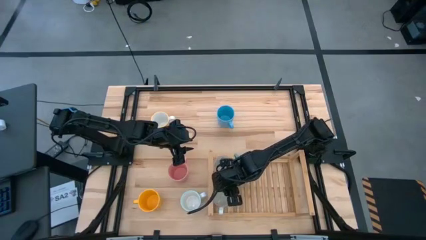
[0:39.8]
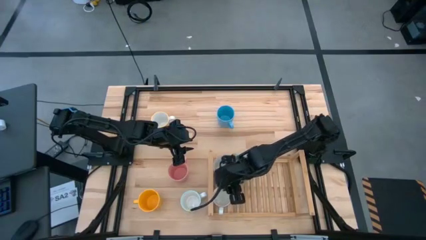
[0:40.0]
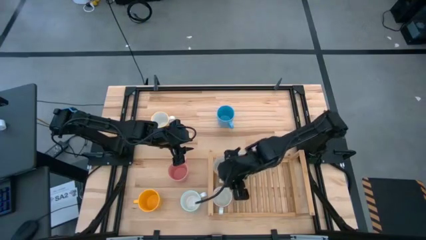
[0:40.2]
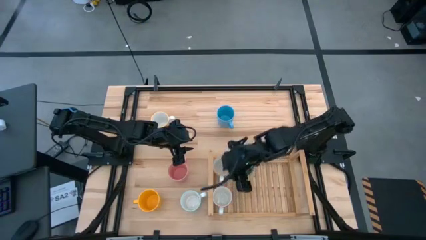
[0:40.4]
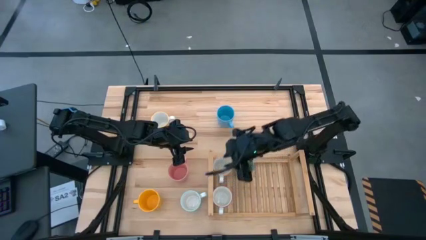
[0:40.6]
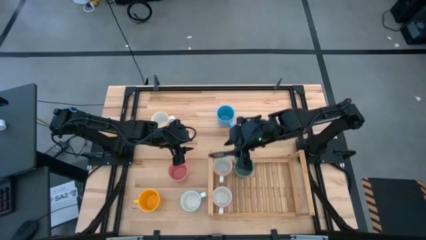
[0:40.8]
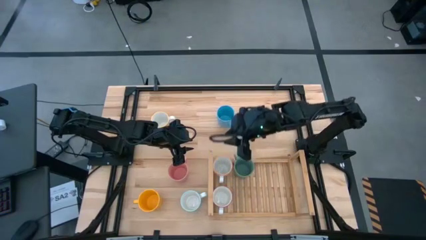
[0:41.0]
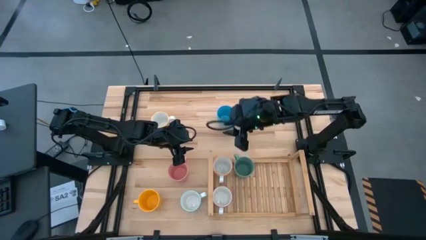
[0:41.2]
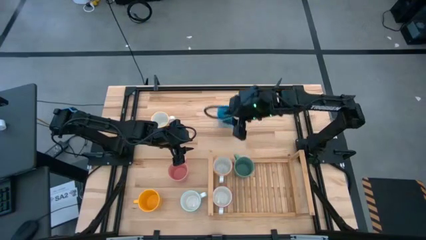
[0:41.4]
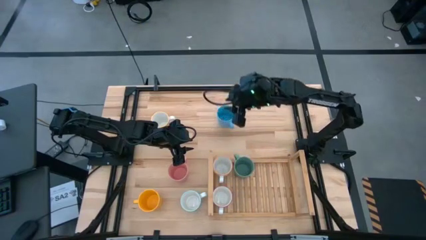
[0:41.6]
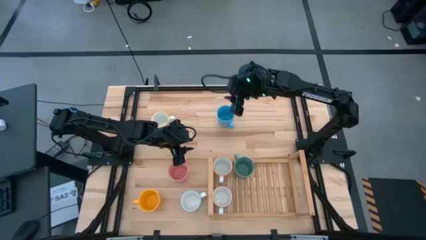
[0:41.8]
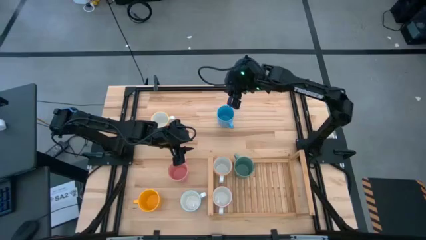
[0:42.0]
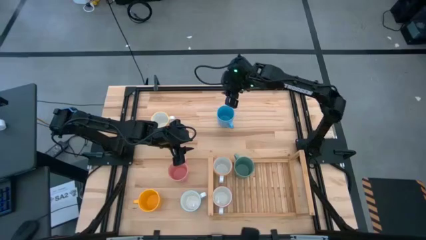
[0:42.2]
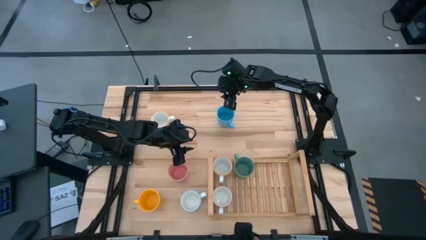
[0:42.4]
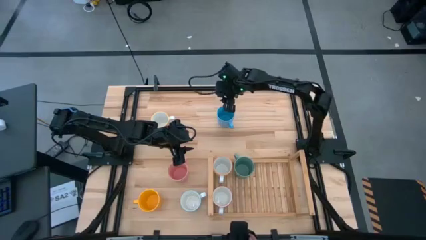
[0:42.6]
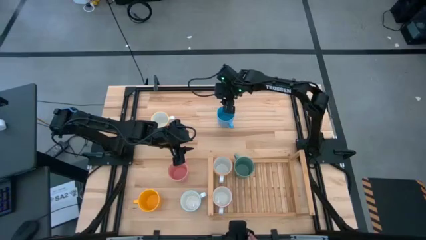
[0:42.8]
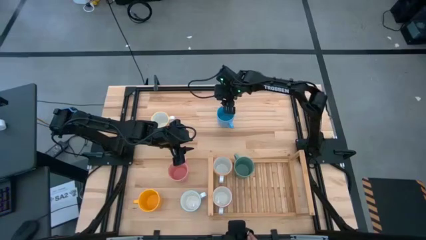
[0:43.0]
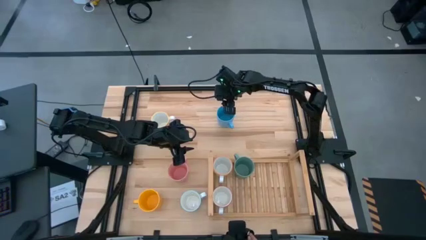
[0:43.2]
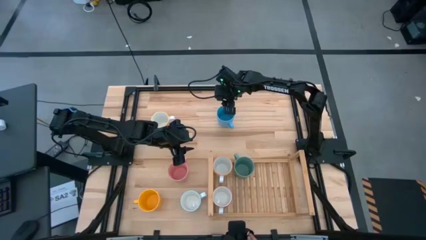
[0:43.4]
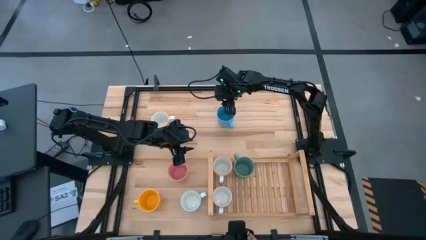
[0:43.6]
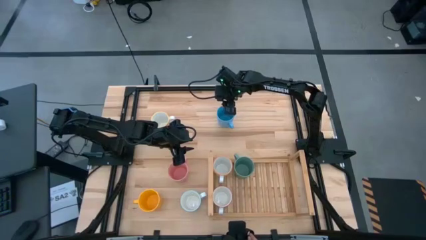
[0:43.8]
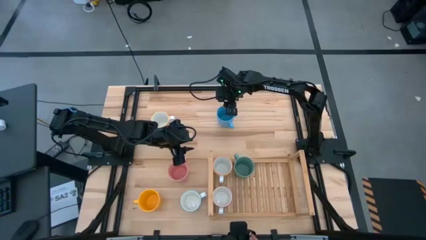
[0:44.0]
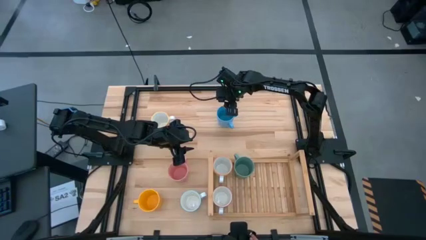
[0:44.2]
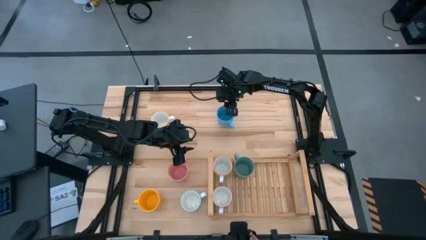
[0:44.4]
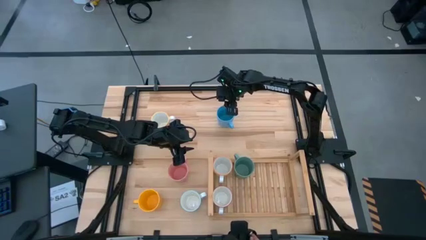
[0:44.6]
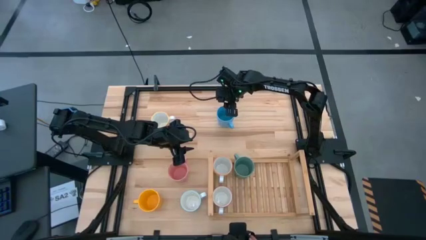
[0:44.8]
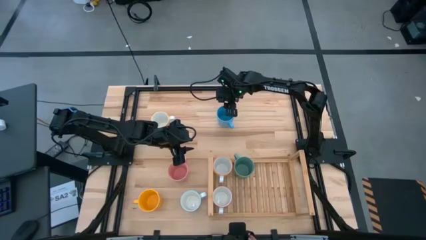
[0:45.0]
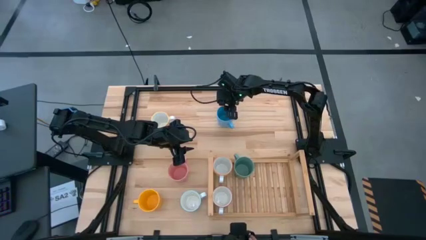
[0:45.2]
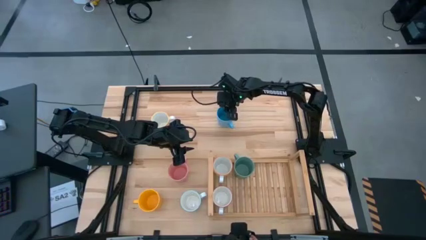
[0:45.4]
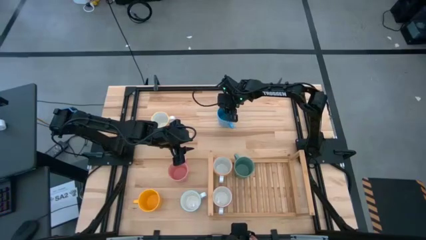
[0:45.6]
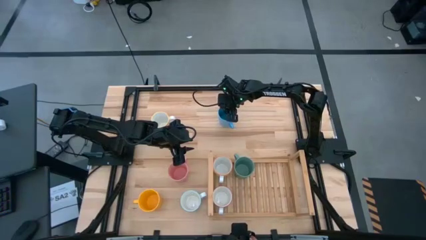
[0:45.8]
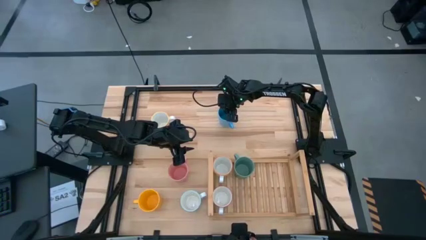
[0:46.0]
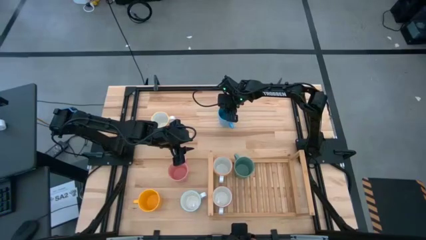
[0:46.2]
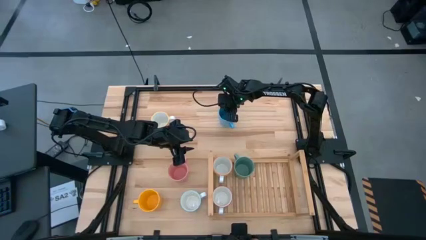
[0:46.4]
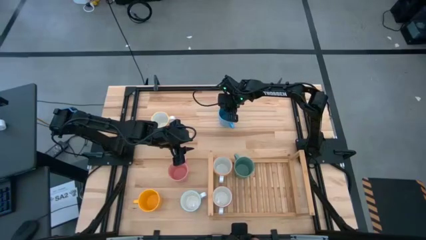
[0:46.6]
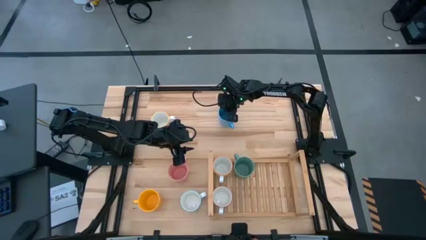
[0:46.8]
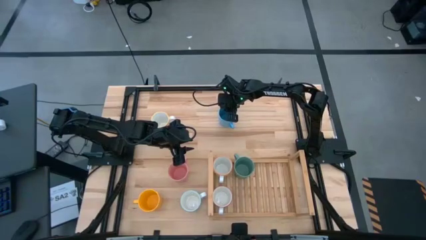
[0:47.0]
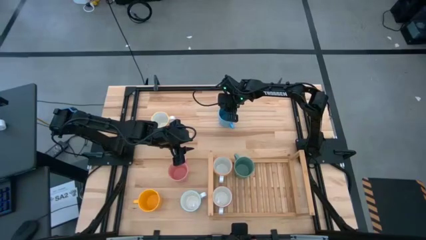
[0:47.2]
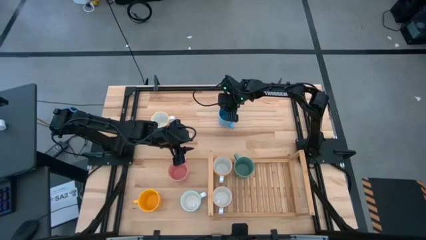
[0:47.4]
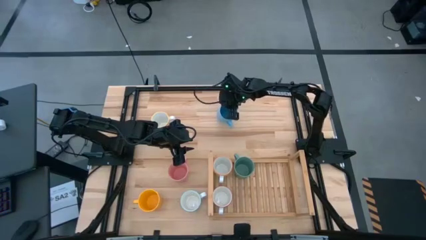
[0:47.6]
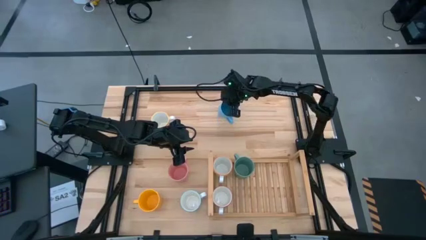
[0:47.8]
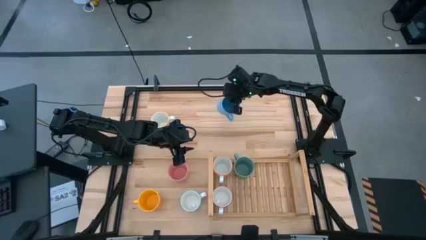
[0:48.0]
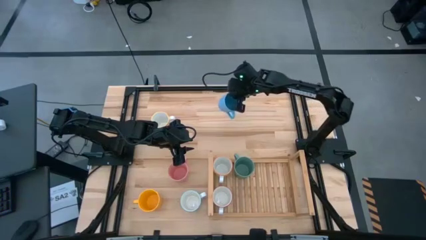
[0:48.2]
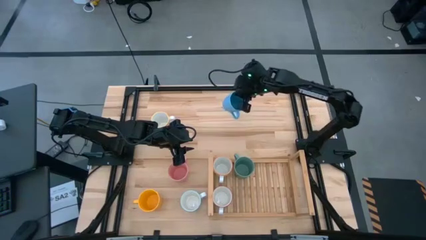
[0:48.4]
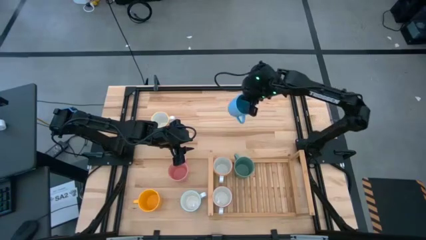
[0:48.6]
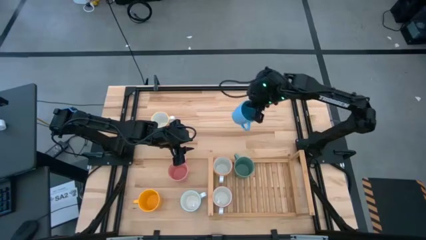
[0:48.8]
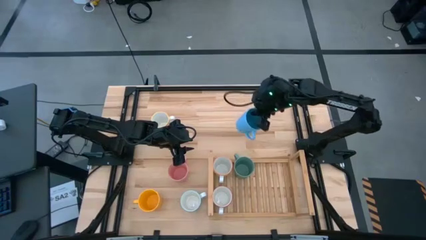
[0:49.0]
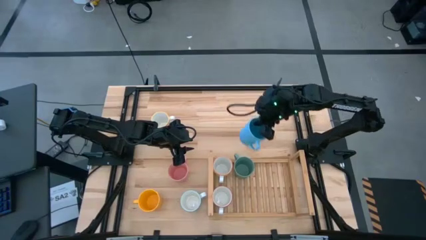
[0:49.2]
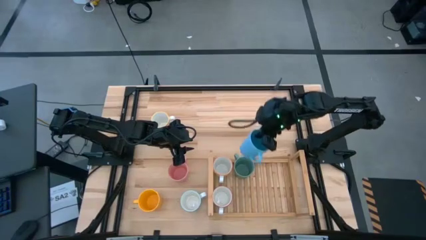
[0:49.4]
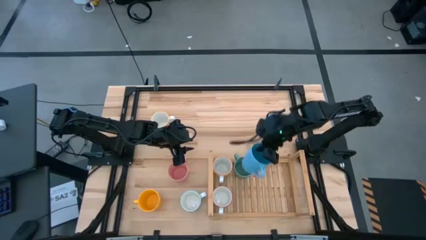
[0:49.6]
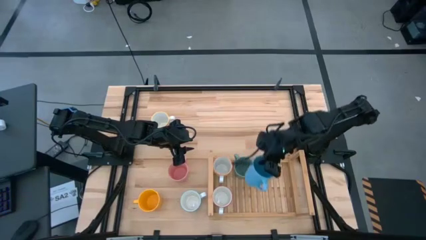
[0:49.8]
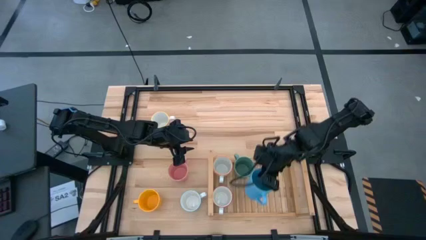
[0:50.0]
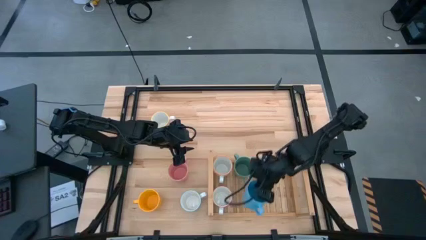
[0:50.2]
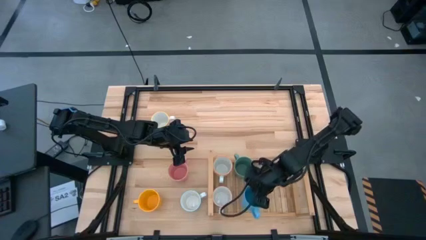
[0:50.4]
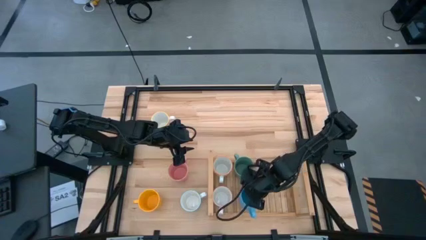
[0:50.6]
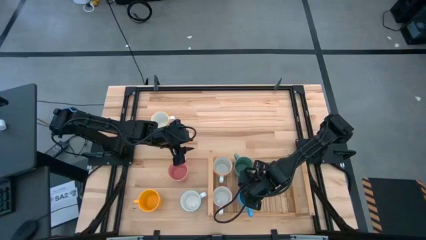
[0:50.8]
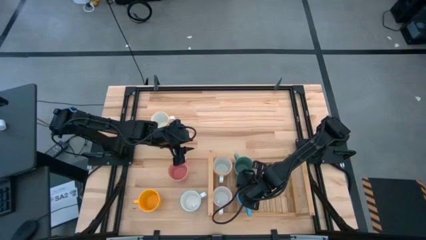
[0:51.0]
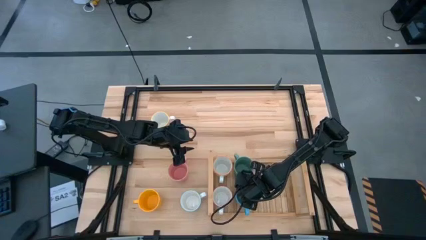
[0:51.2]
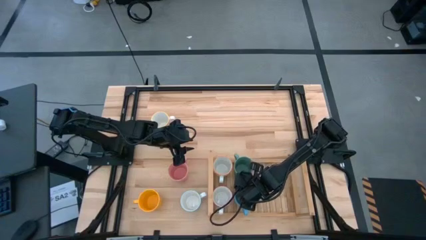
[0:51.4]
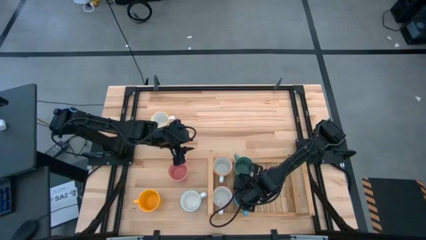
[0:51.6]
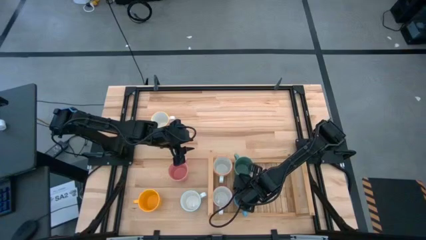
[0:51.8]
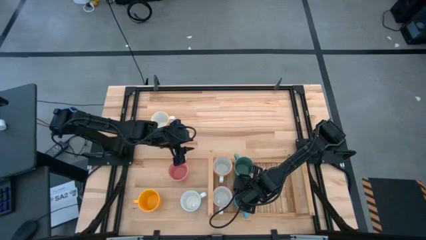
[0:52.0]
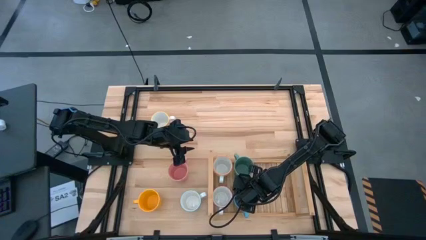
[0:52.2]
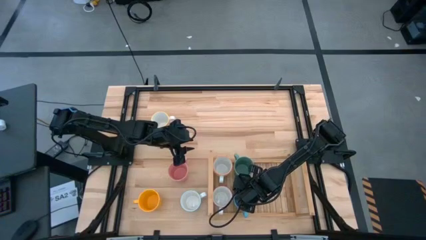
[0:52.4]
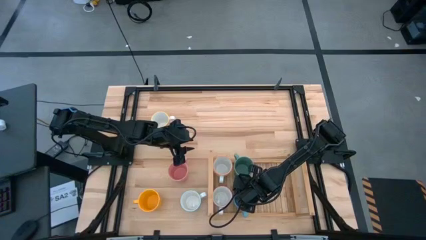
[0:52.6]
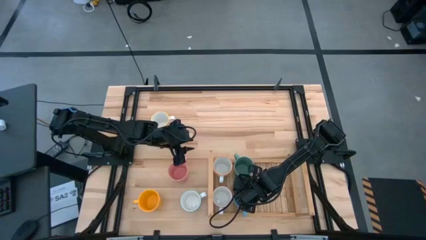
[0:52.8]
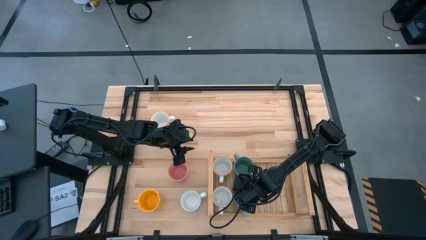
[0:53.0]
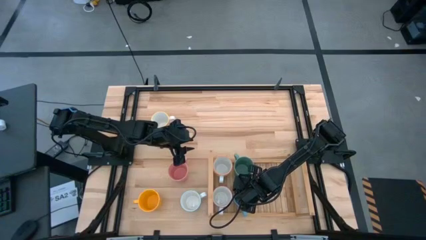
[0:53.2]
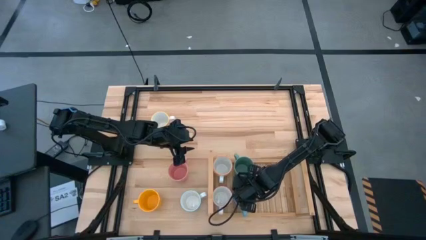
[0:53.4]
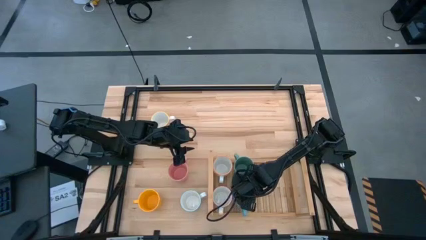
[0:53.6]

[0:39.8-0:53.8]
Task: Place coffee mugs
Put the blue mug on the shelf

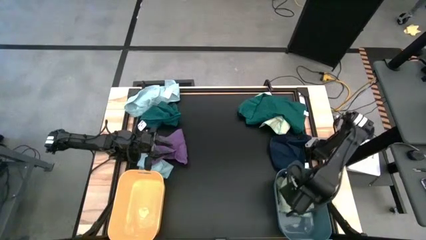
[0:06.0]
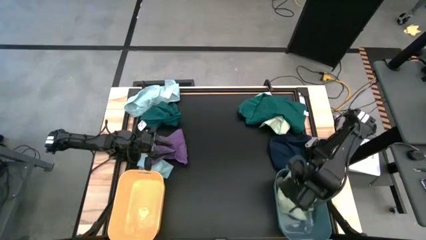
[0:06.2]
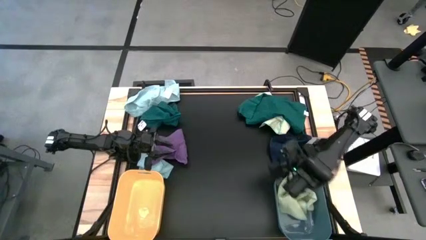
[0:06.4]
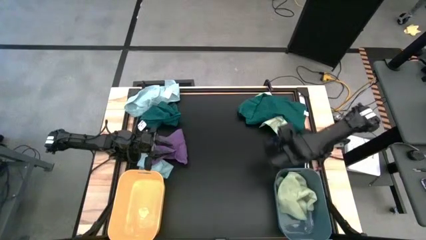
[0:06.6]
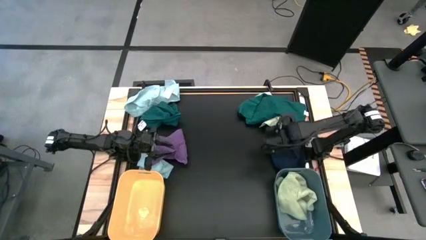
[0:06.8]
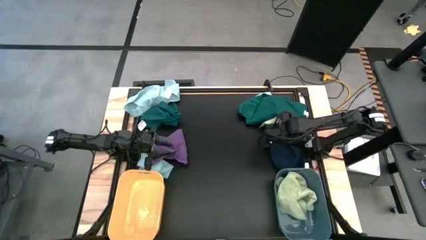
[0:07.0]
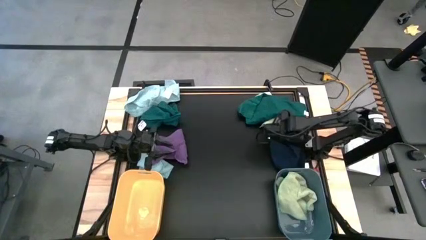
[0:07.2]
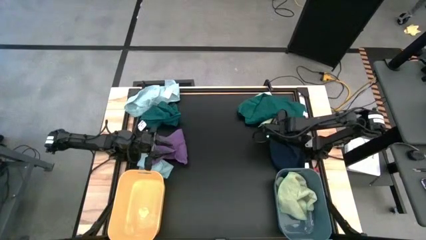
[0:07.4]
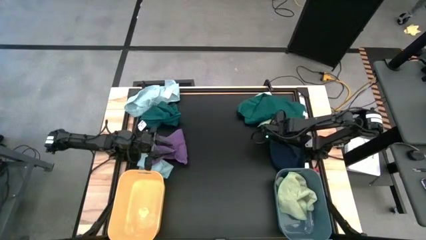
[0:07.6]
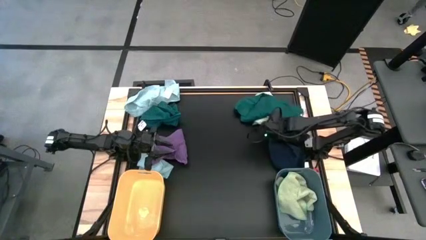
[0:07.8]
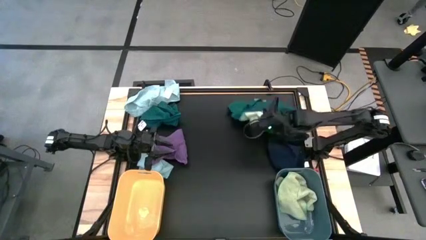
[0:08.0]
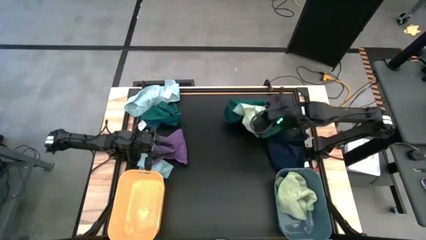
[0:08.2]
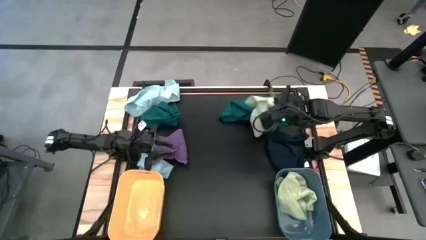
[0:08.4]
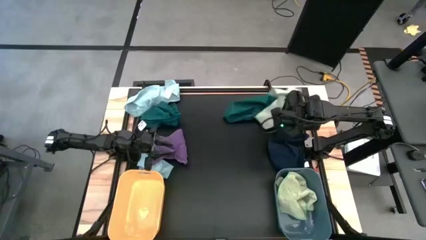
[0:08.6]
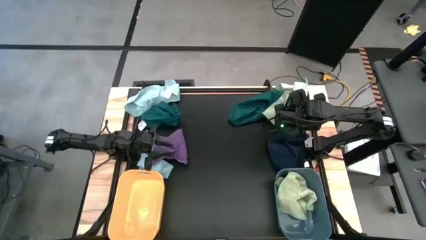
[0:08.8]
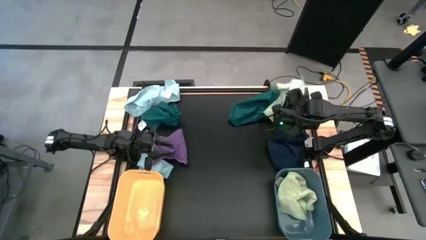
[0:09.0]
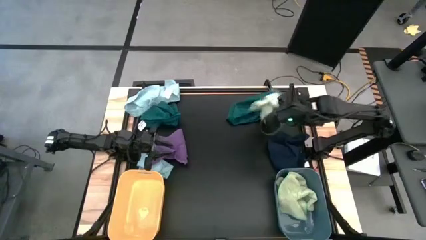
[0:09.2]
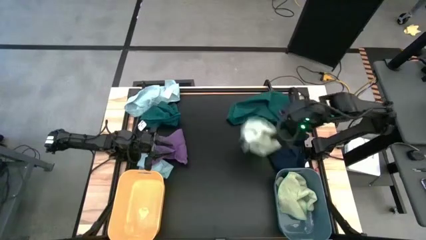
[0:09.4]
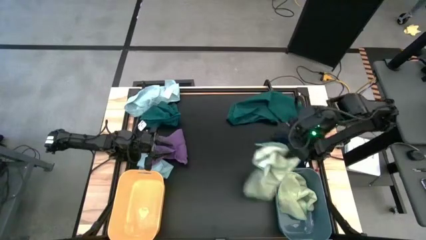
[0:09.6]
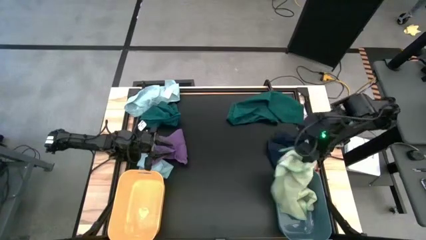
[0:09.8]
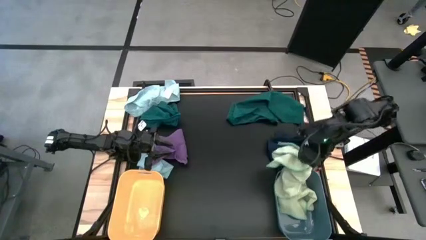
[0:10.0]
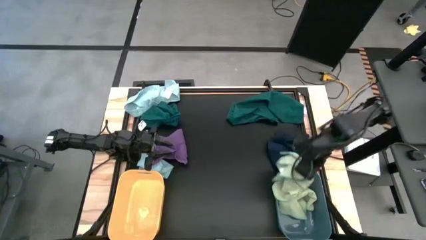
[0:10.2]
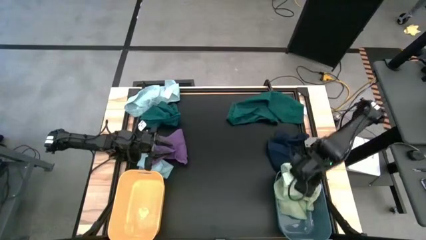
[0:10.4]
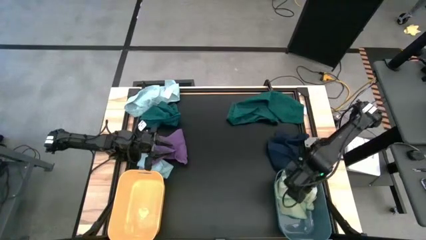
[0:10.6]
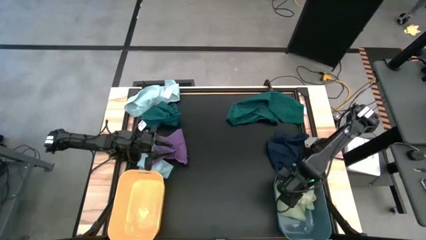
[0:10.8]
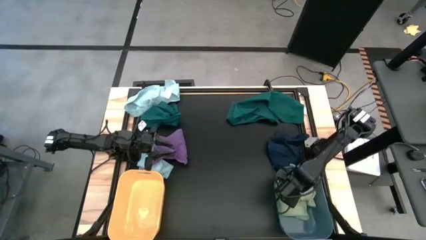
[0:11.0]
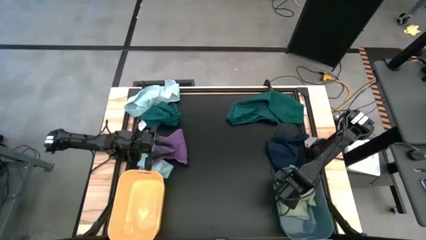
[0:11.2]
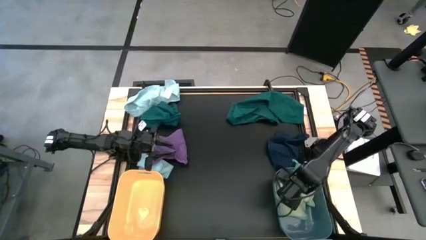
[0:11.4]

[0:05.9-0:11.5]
Task: Sort microfiber towel by color & place in baskets
Put the light green microfiber towel into the blue bin
